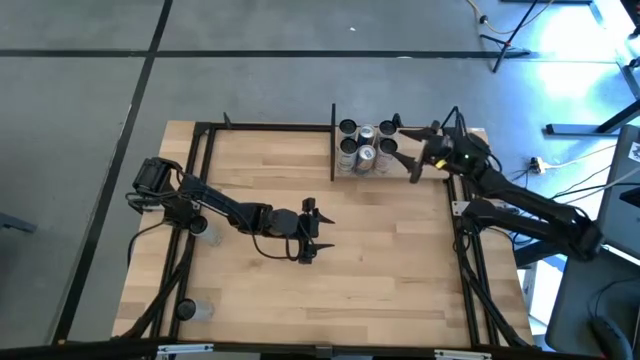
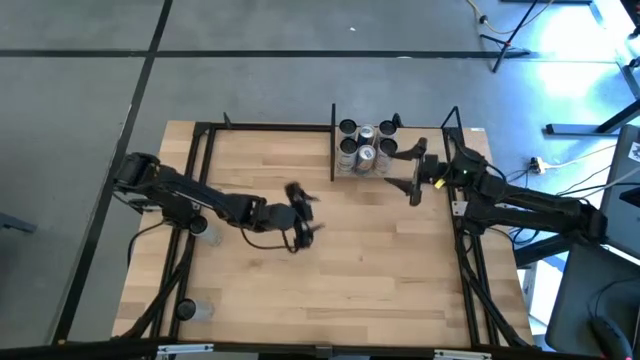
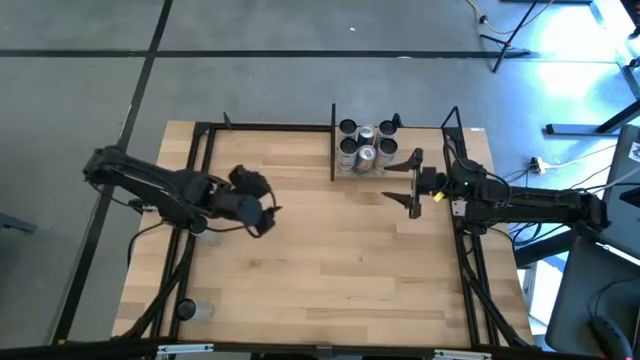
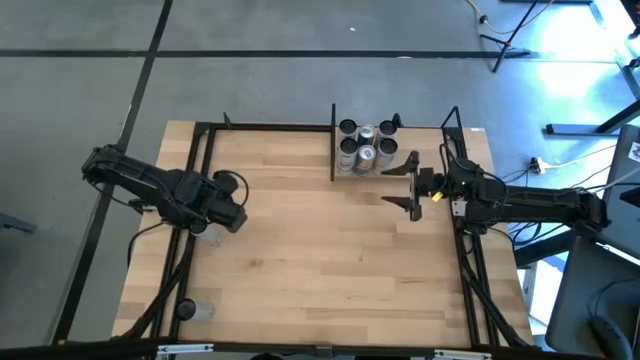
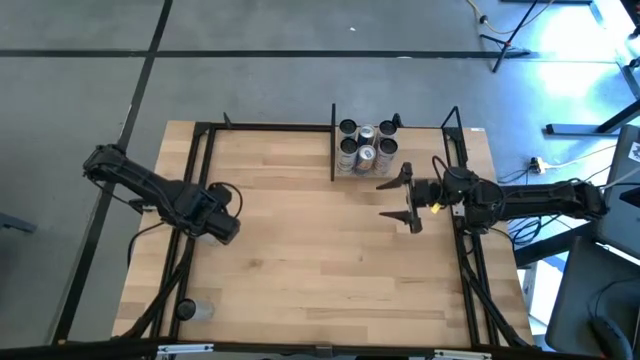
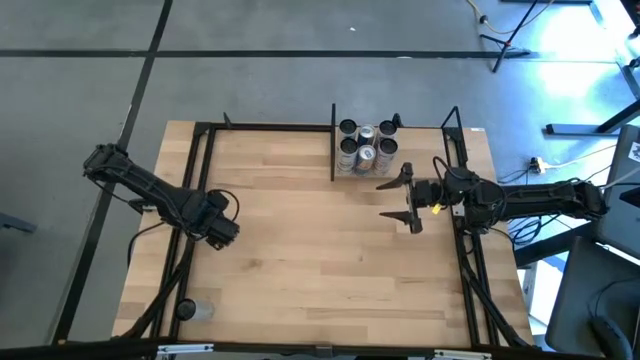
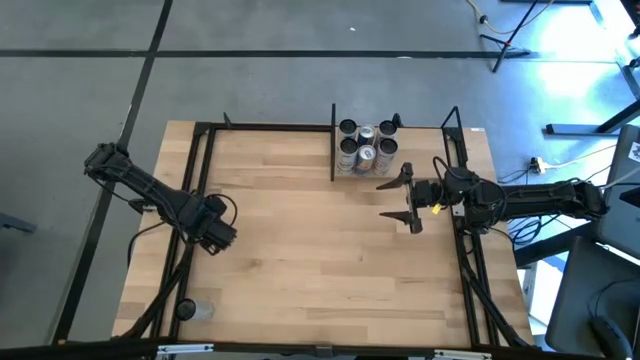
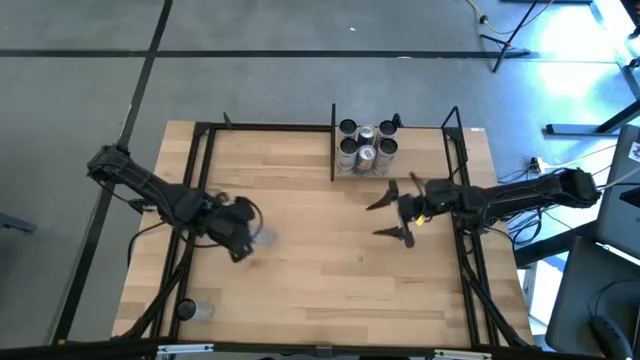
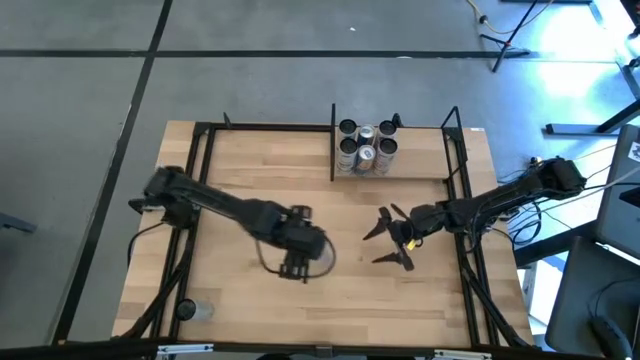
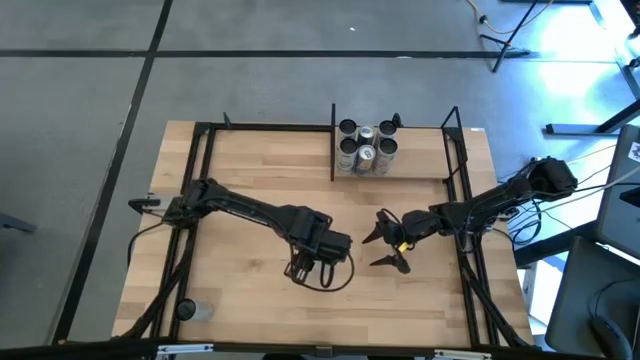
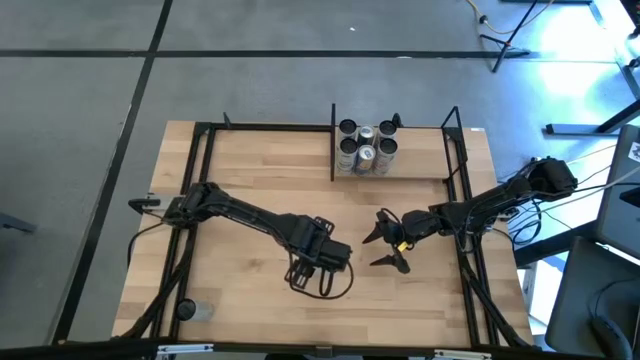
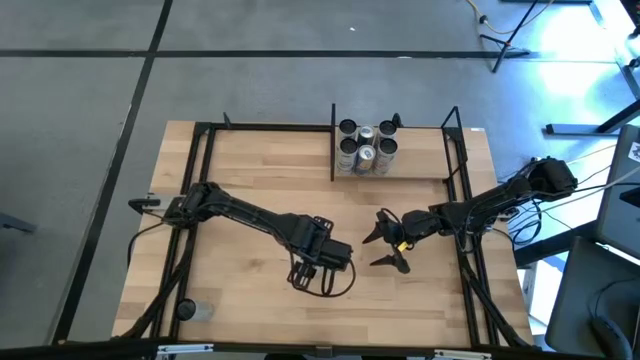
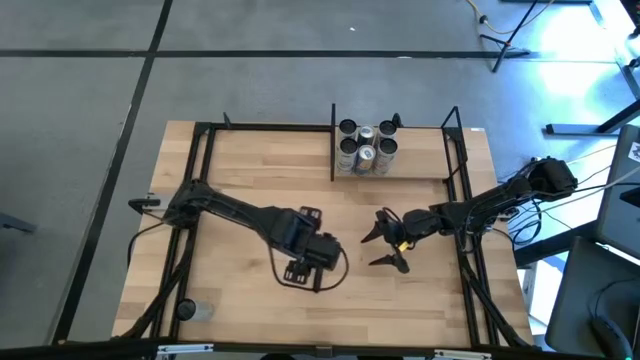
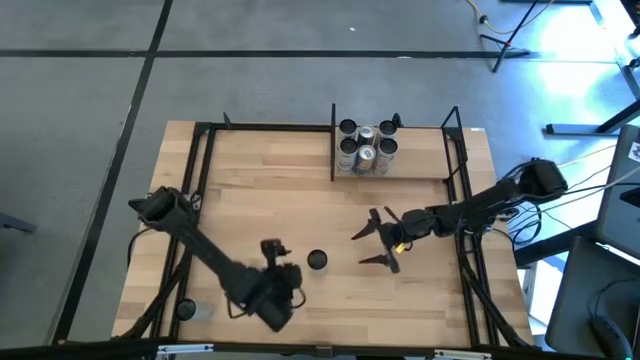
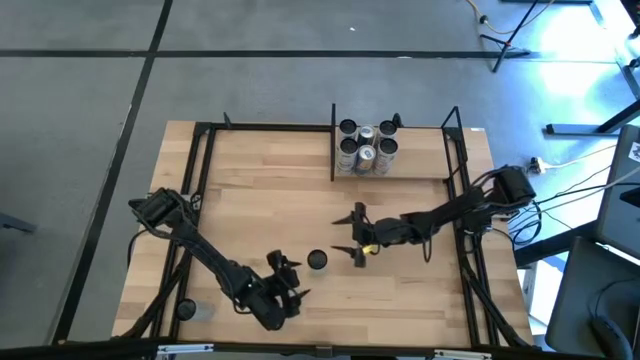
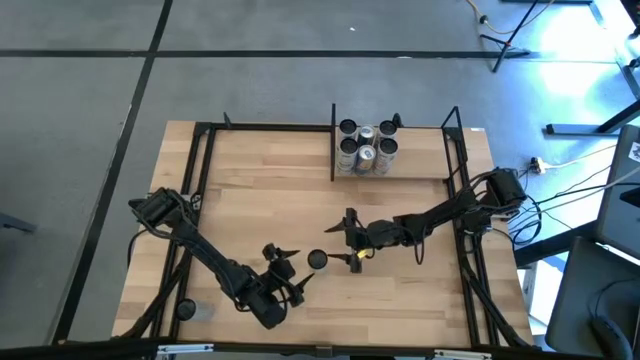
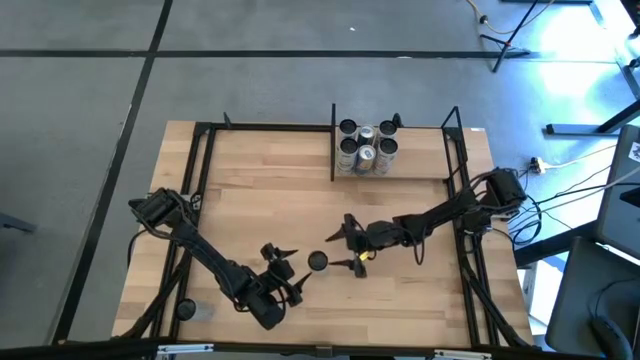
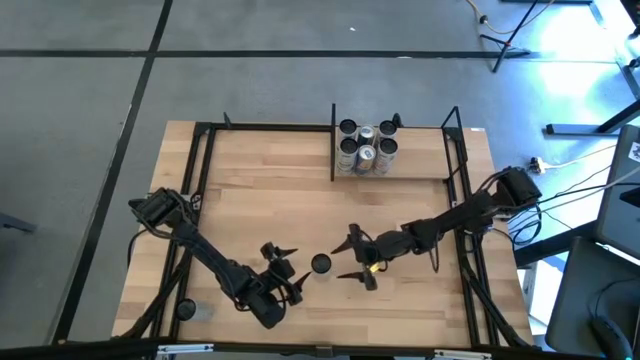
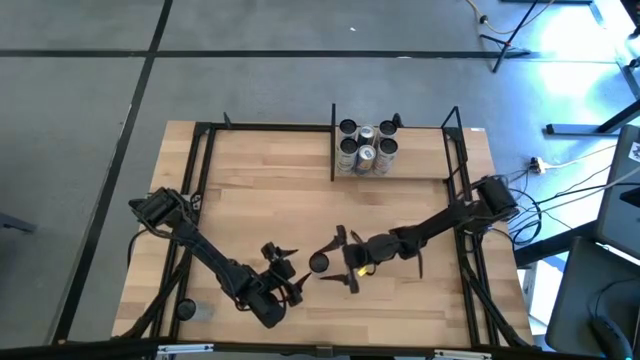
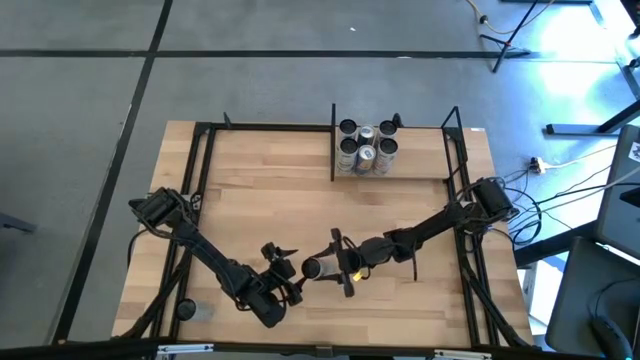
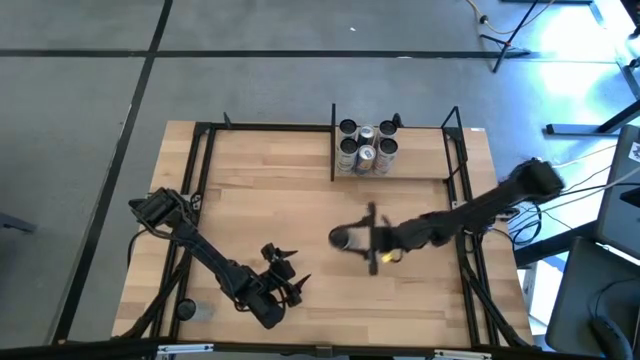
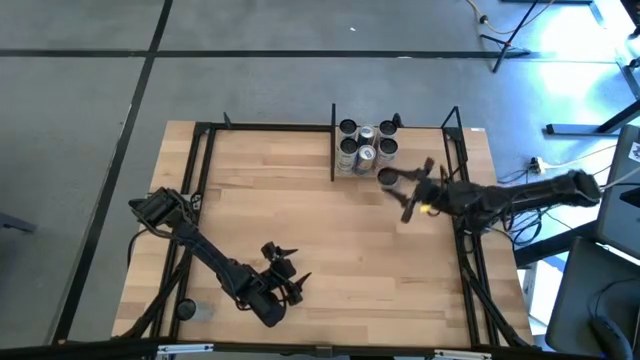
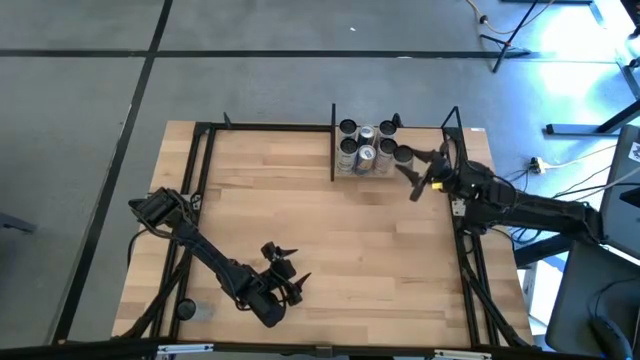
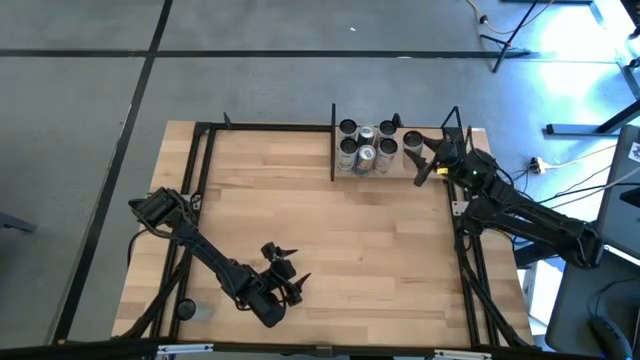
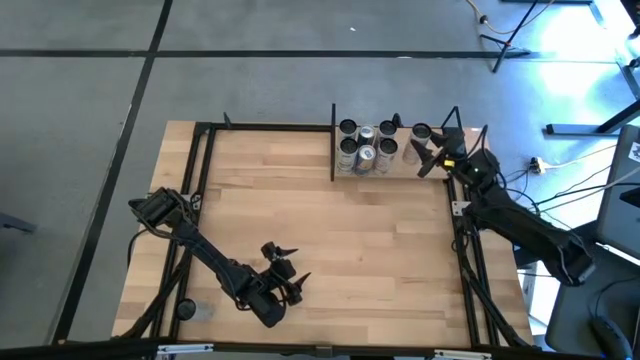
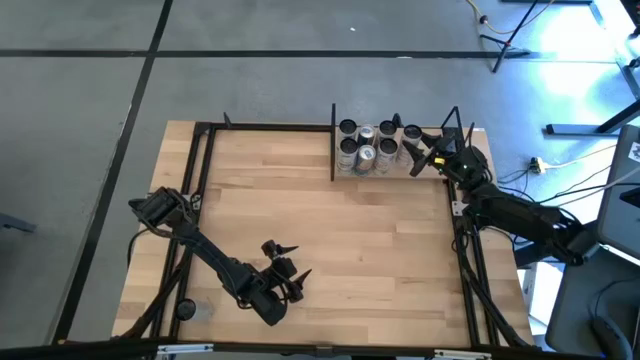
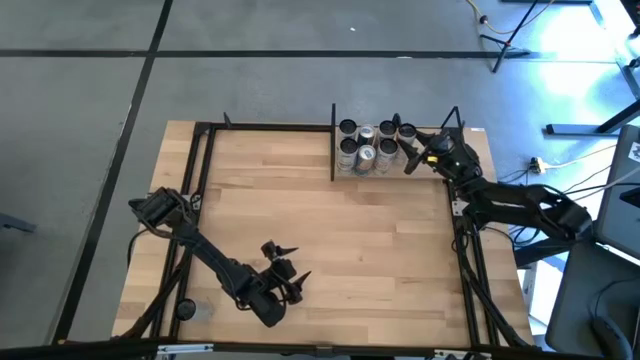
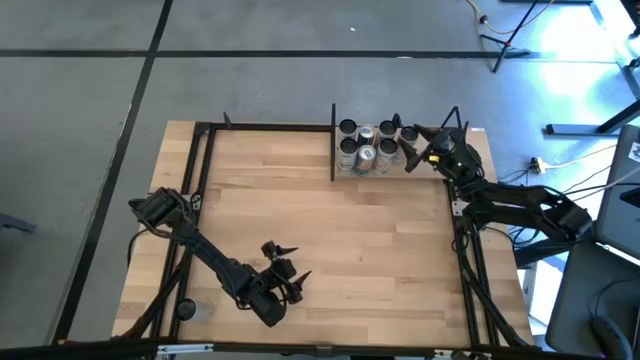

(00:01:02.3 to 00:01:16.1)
Task: Place canned beverage on shelf
Put the top black soda can on the shelf

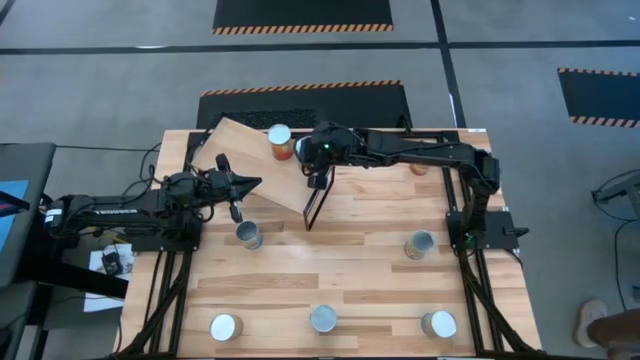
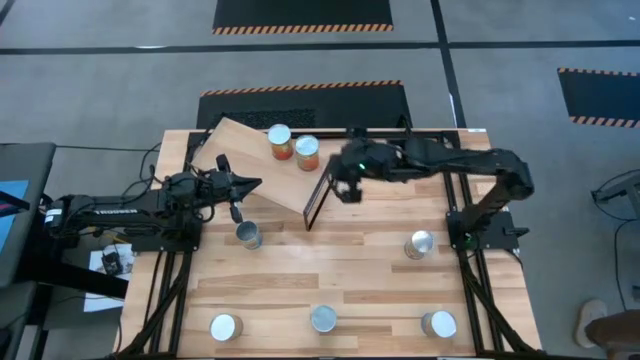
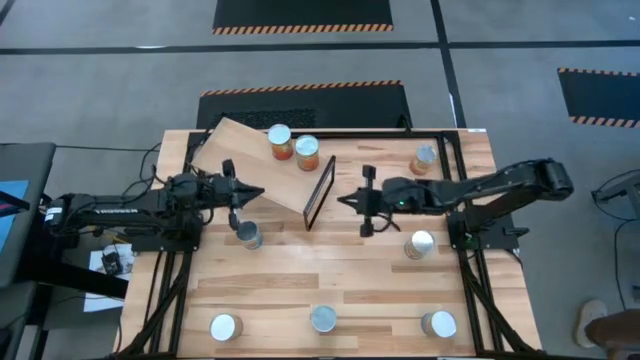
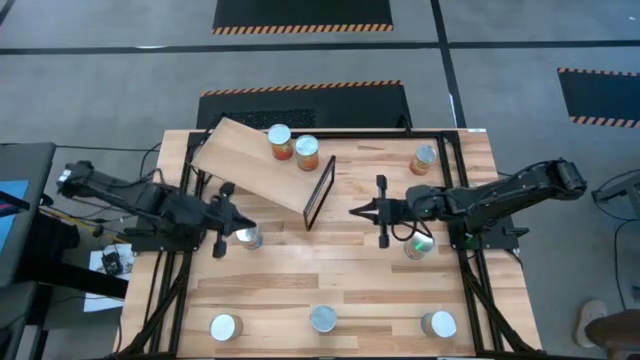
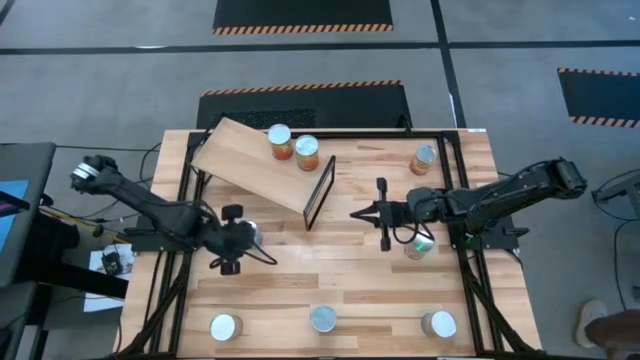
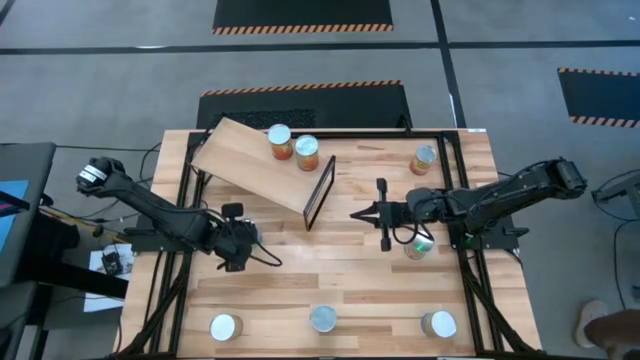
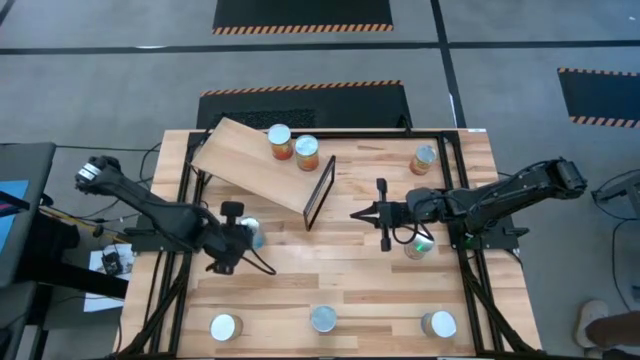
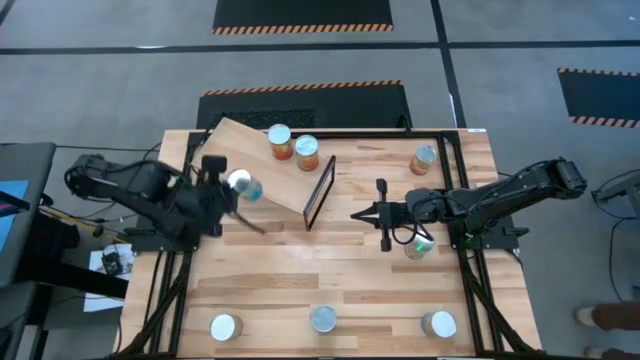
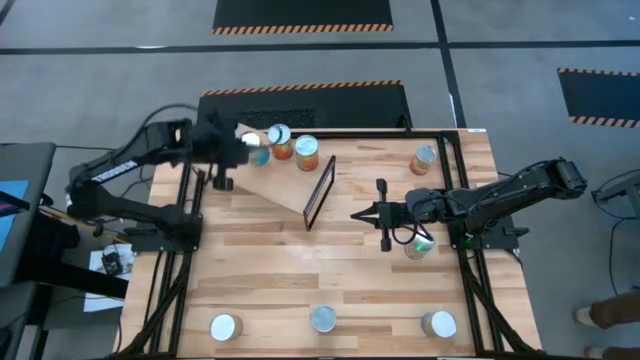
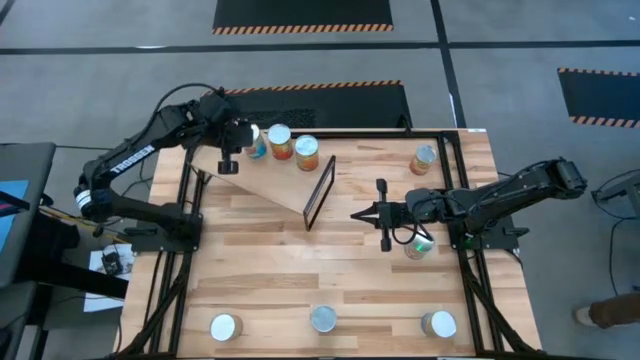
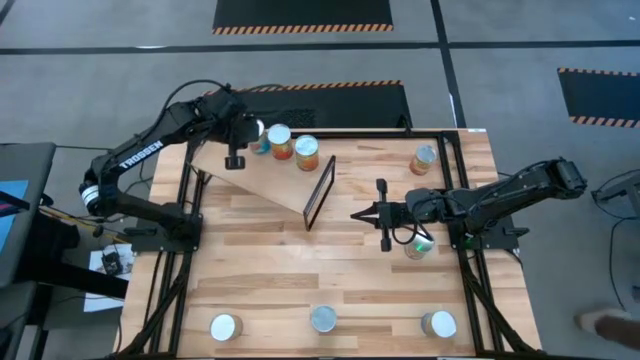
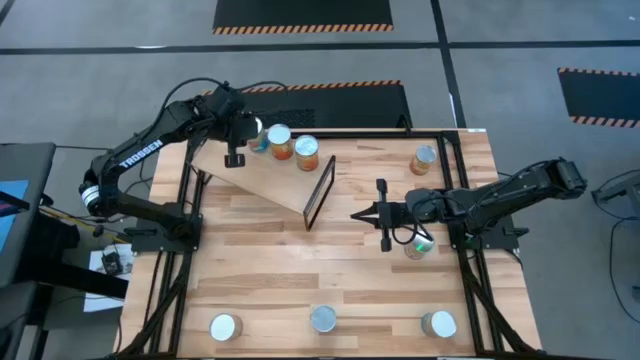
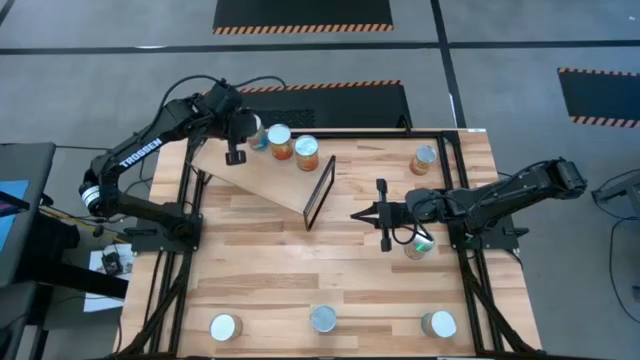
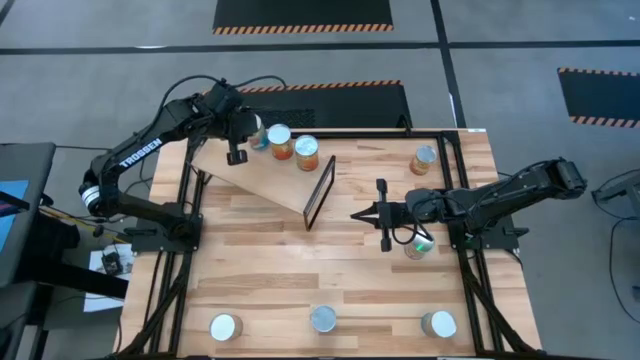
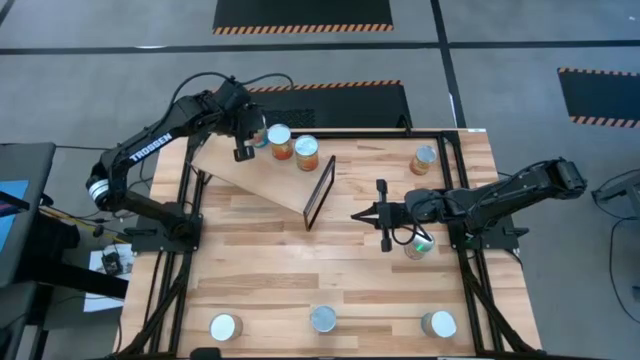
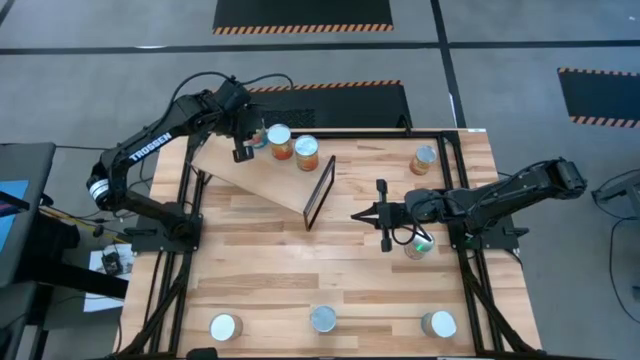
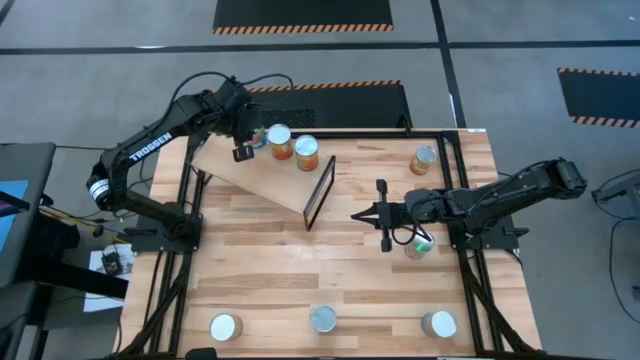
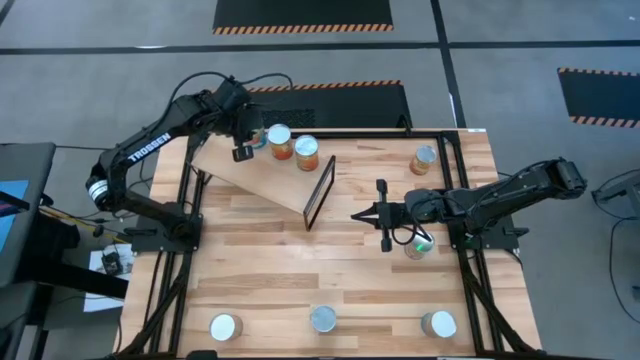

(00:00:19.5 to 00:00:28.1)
Task: Pick and place cans onto a shelf
Put the top canned tomatoes on the shelf
